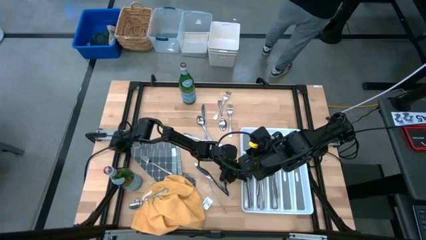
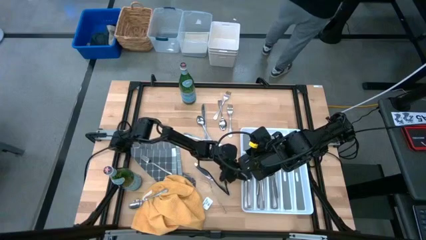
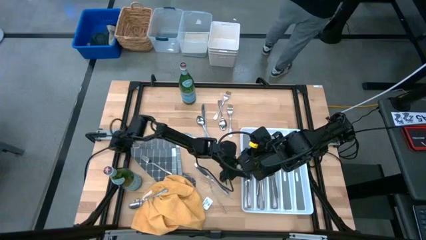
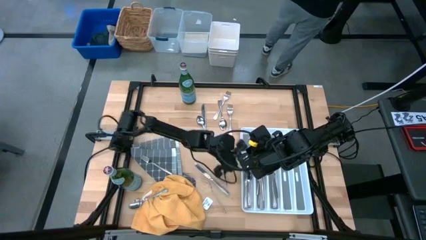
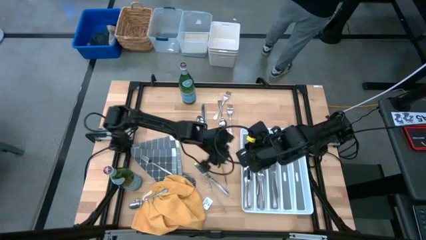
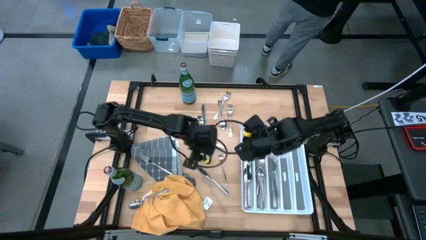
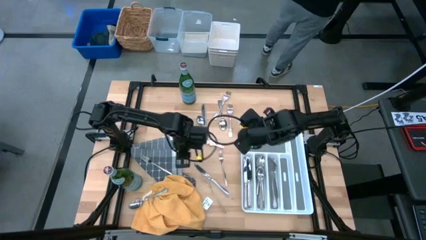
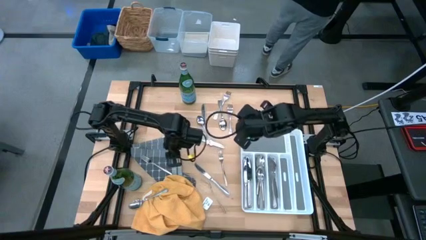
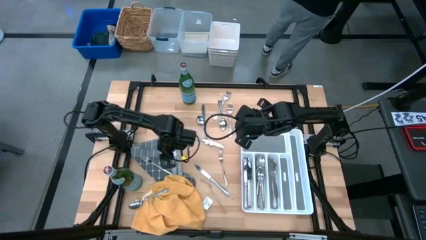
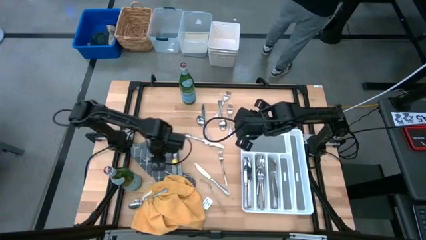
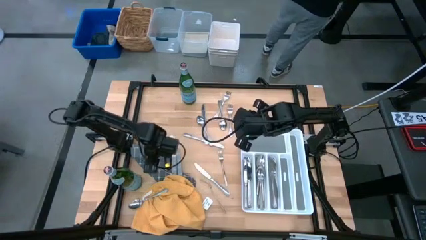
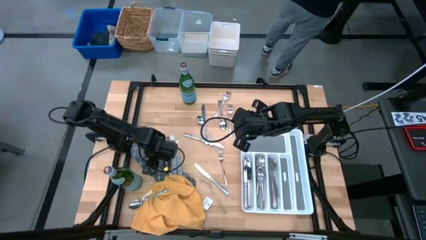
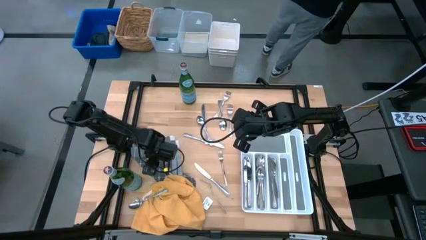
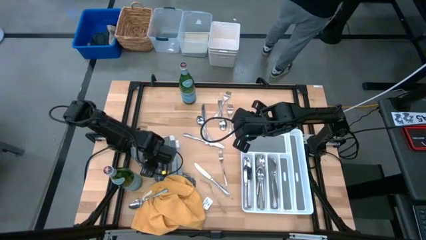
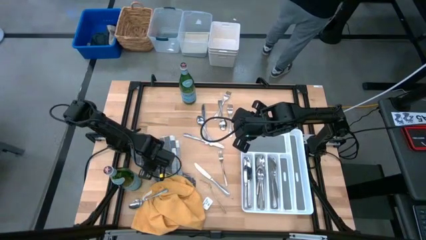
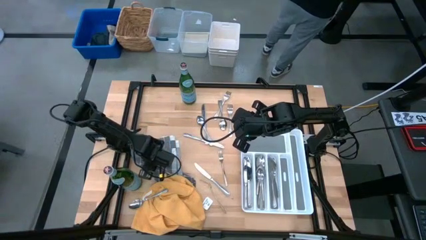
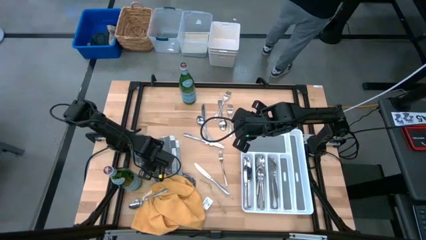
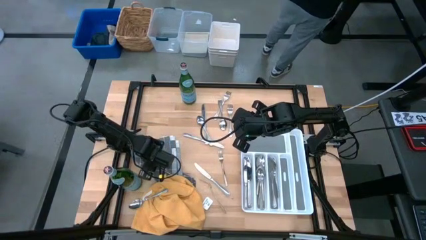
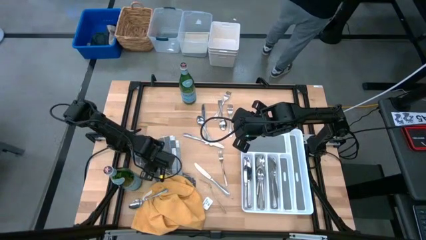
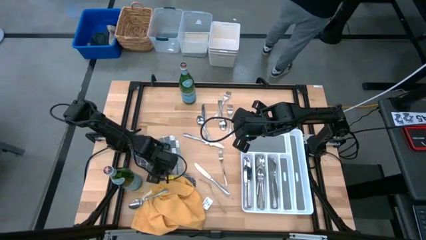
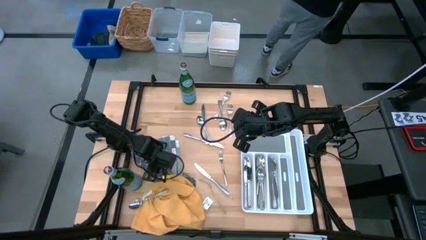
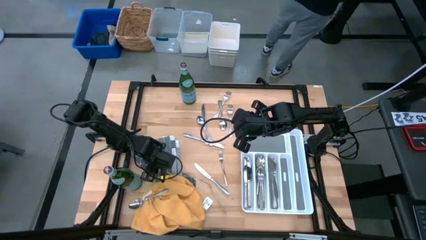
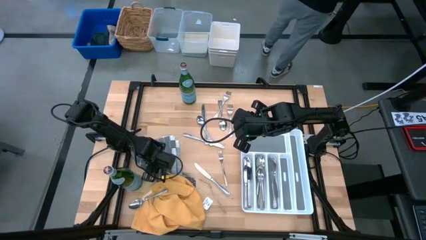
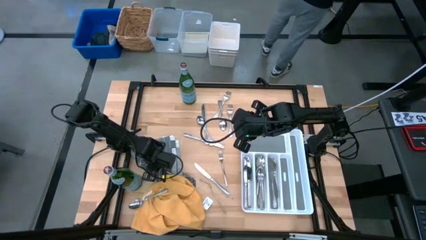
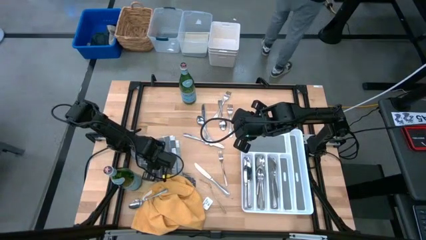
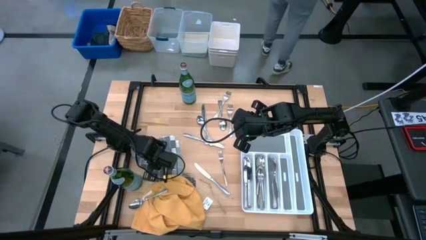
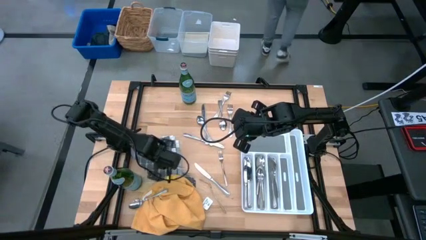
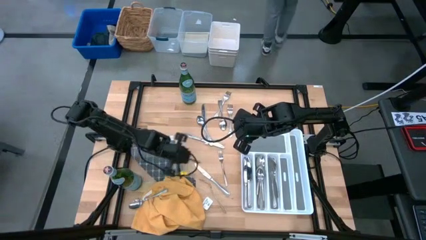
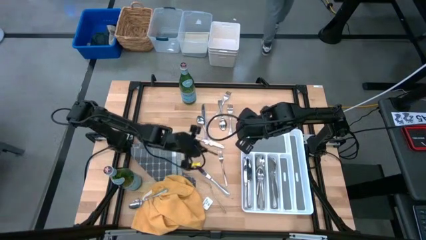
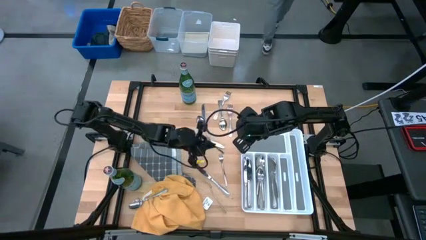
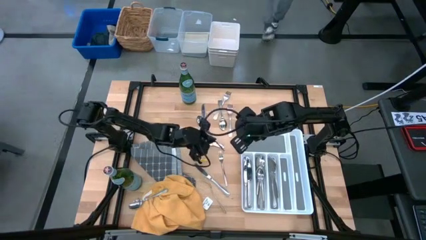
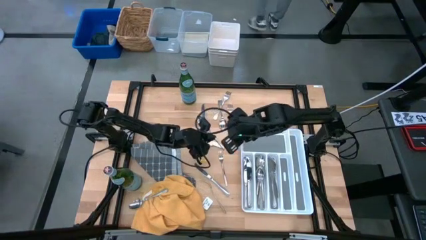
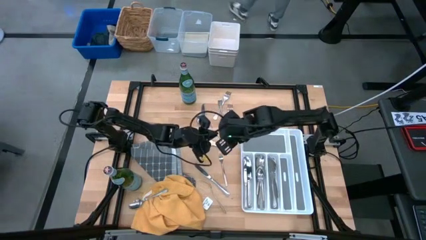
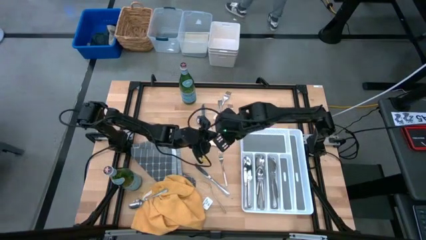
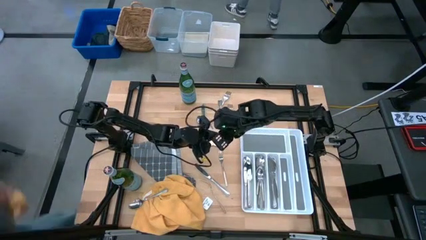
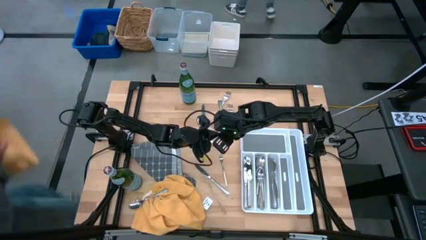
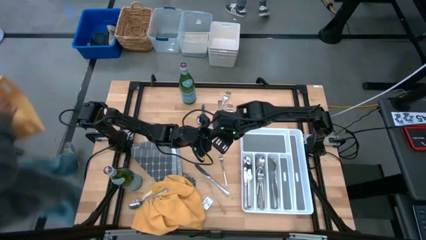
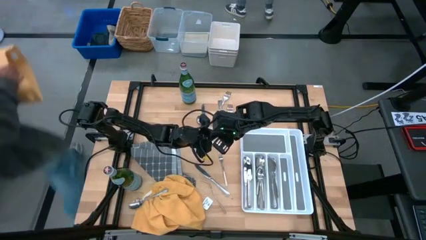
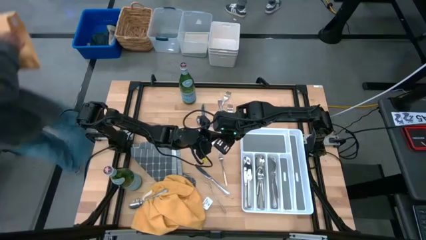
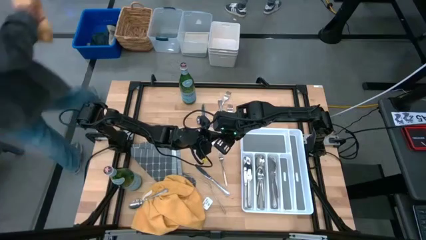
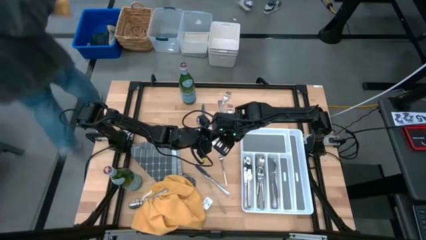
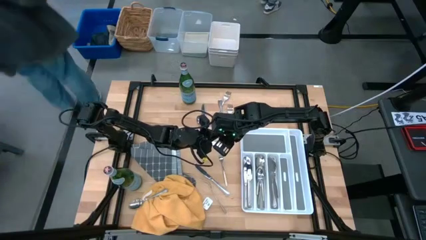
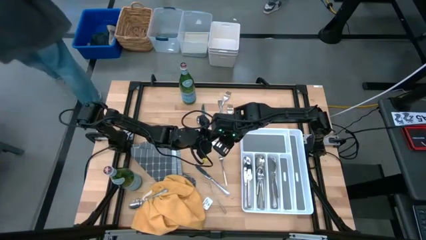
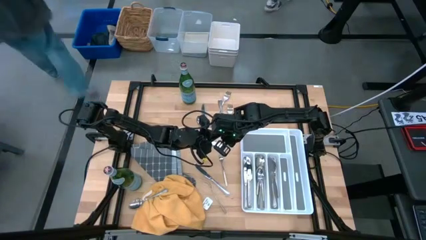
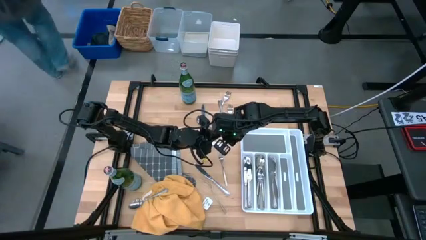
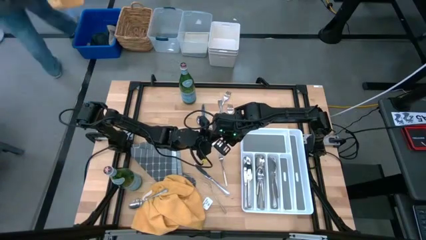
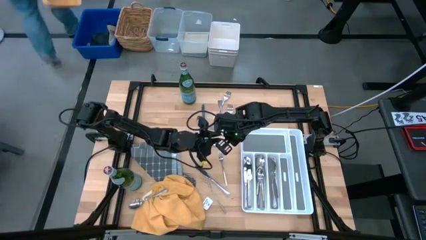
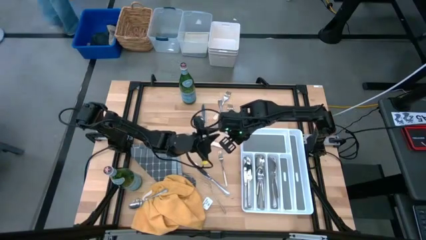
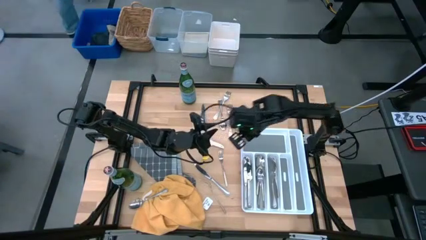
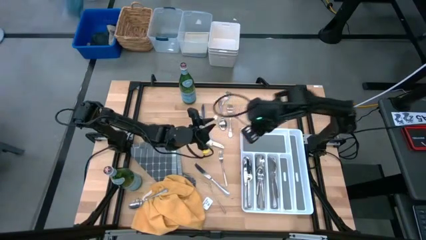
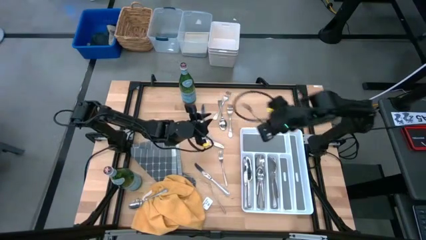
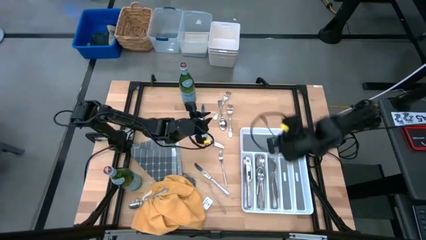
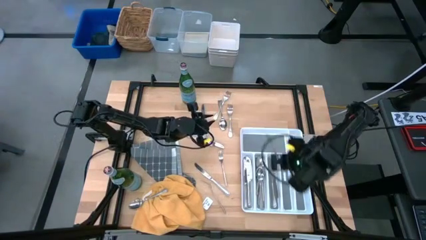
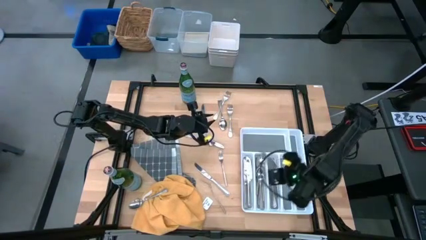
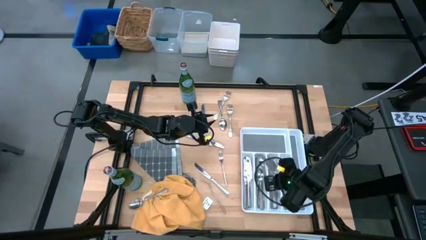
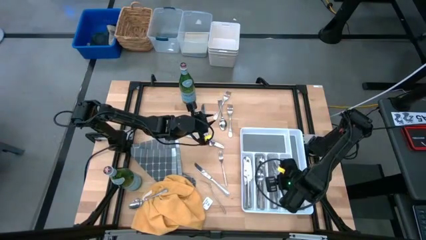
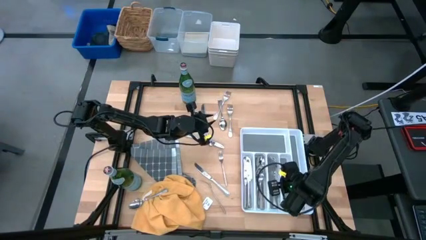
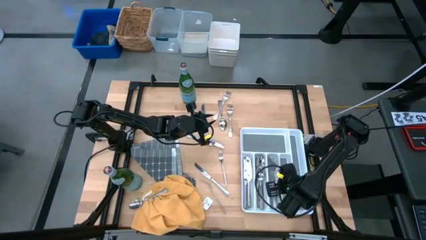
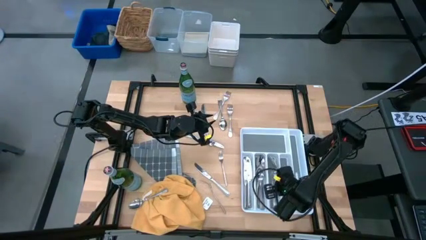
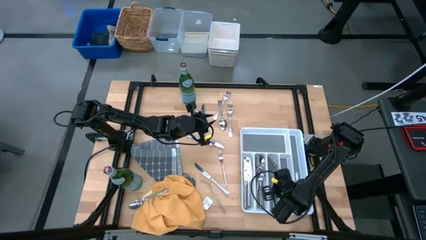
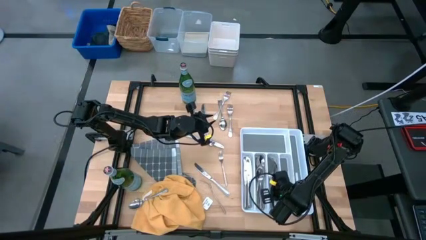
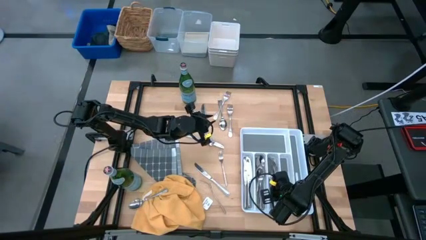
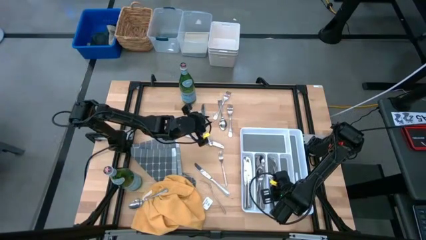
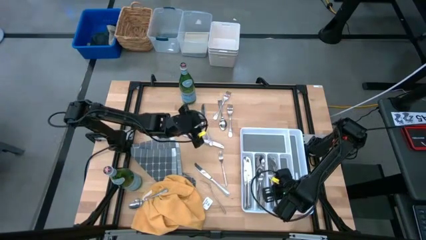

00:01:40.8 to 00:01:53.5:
Stack the silver fork into the white utensil tray with the other silver forks
